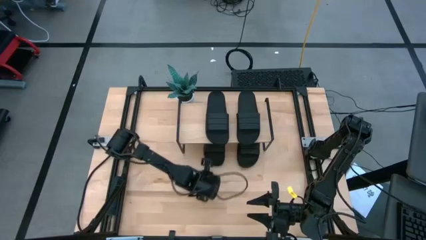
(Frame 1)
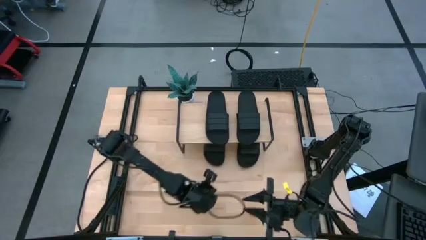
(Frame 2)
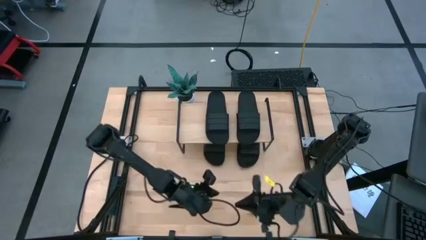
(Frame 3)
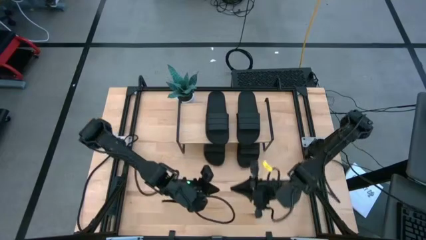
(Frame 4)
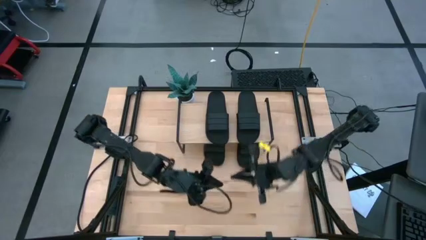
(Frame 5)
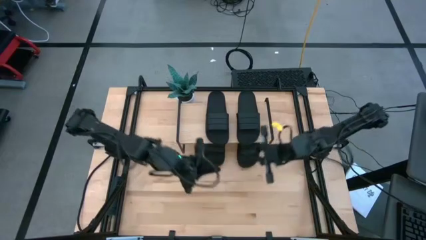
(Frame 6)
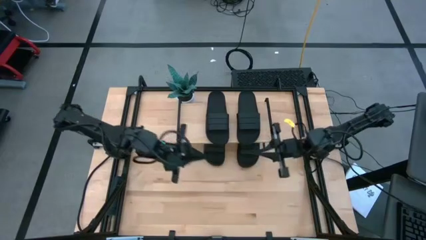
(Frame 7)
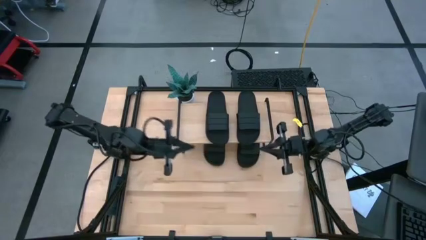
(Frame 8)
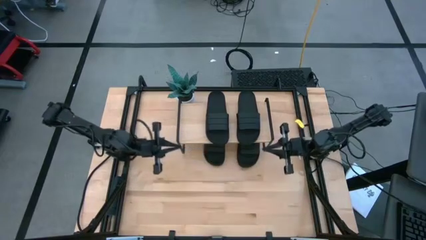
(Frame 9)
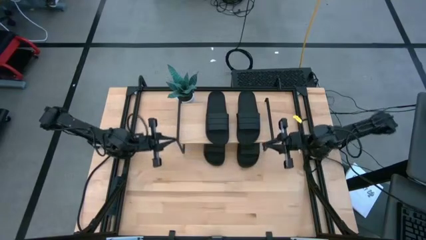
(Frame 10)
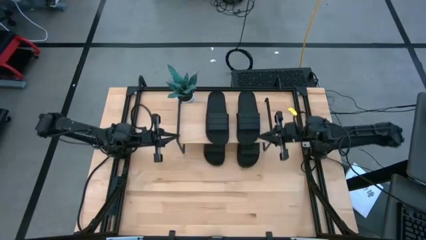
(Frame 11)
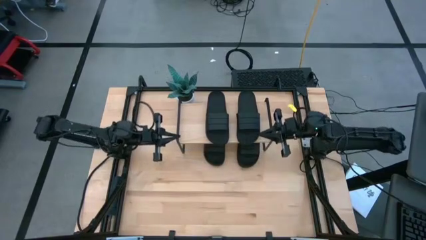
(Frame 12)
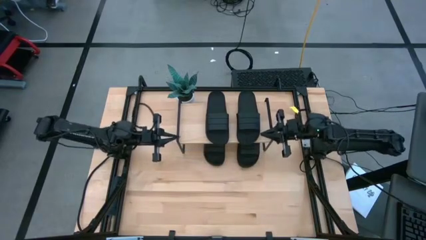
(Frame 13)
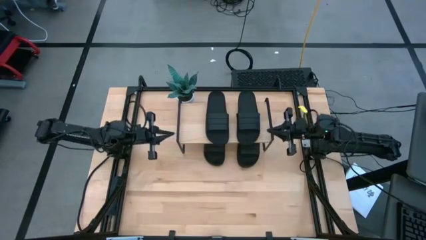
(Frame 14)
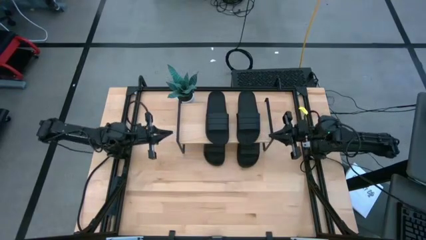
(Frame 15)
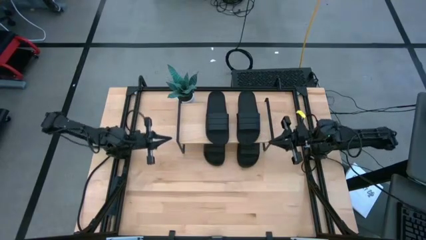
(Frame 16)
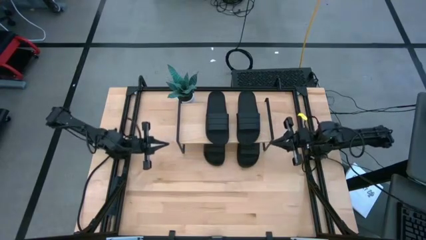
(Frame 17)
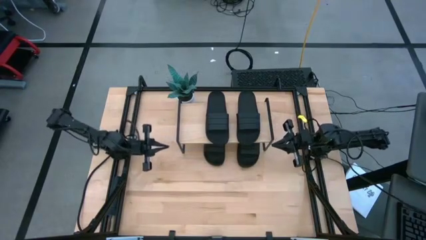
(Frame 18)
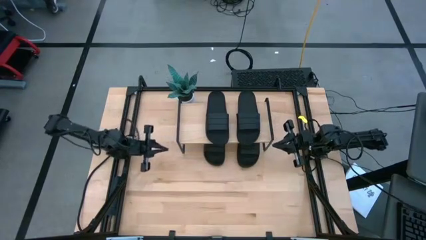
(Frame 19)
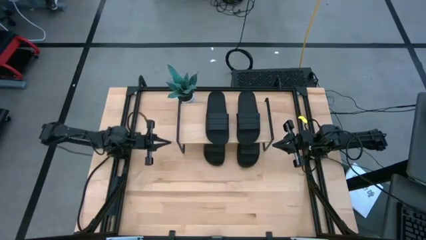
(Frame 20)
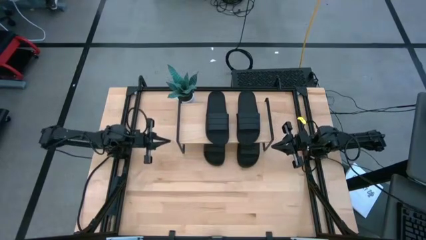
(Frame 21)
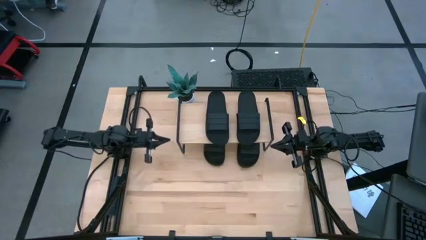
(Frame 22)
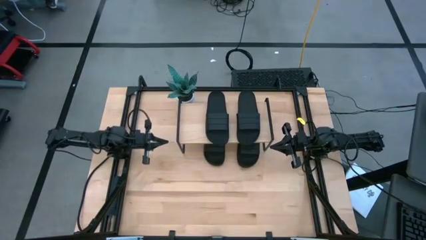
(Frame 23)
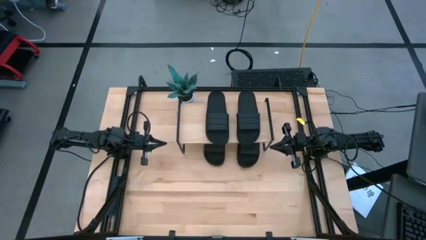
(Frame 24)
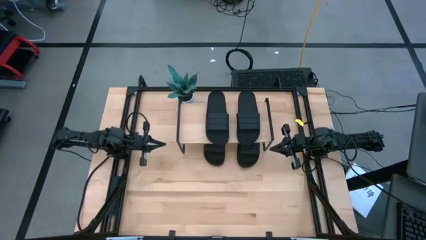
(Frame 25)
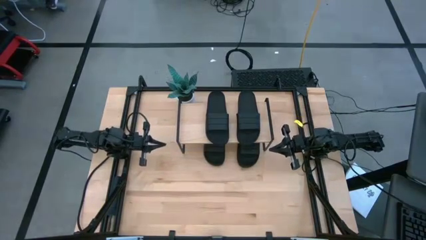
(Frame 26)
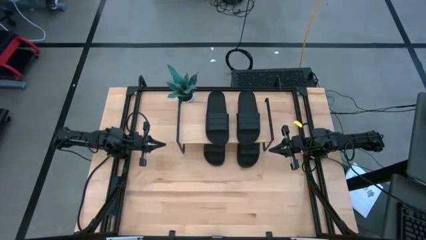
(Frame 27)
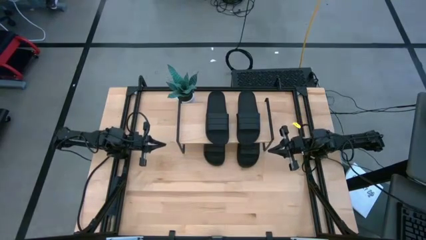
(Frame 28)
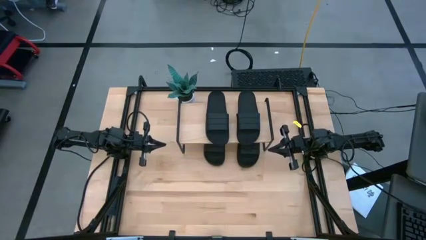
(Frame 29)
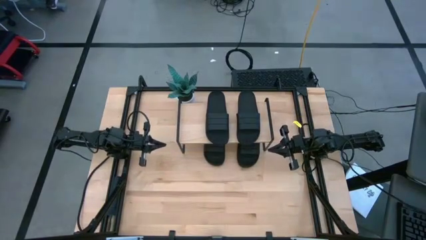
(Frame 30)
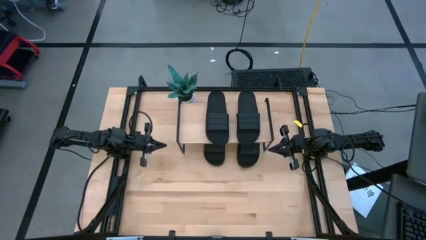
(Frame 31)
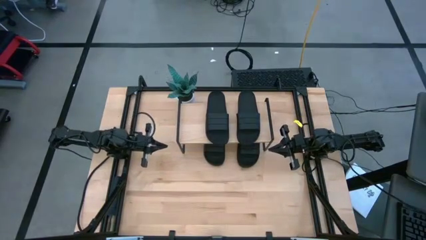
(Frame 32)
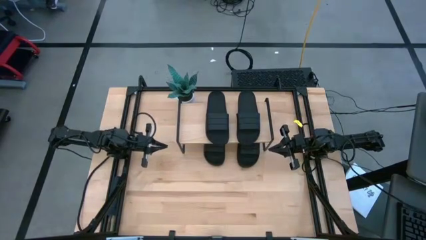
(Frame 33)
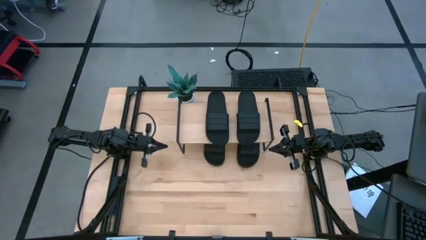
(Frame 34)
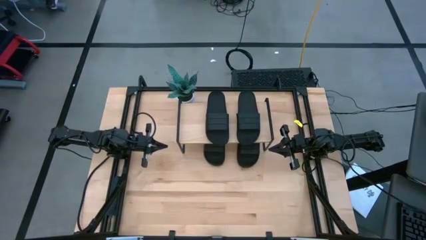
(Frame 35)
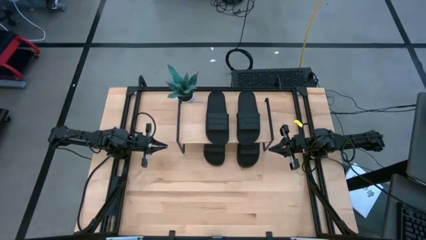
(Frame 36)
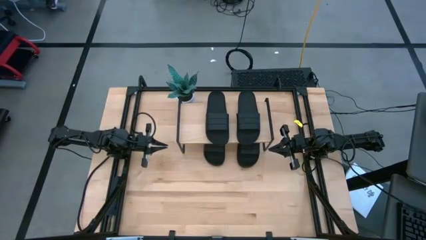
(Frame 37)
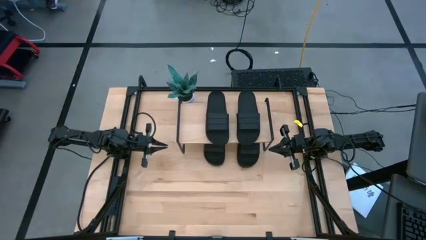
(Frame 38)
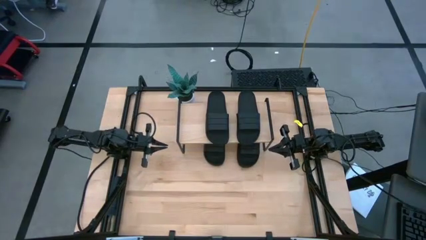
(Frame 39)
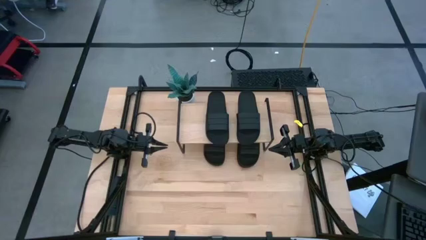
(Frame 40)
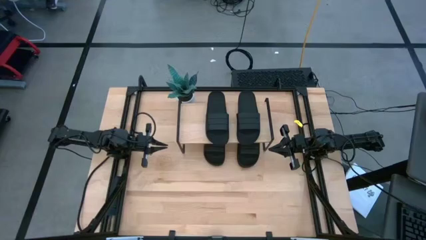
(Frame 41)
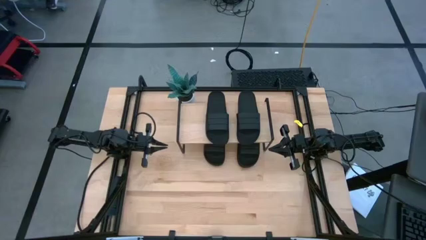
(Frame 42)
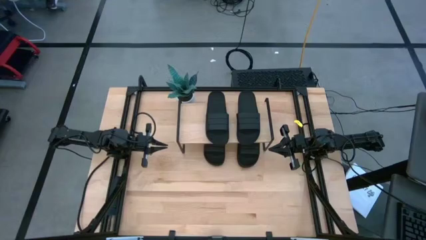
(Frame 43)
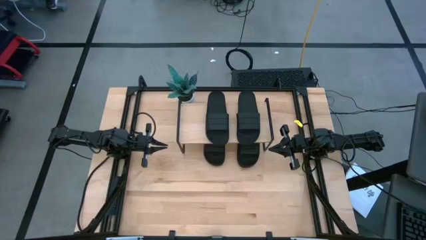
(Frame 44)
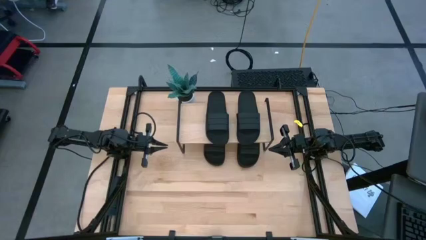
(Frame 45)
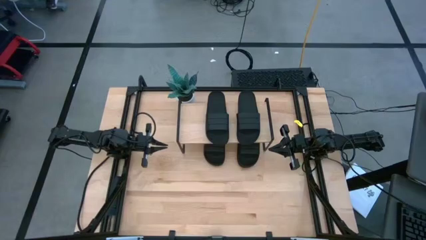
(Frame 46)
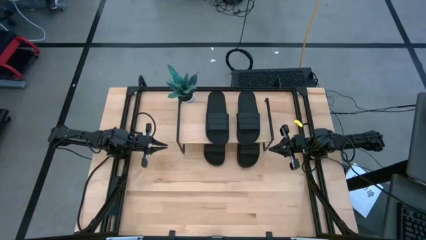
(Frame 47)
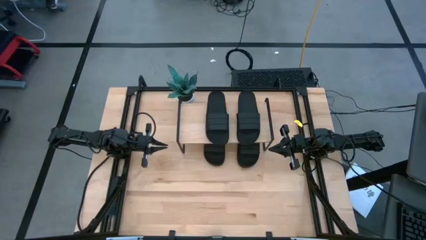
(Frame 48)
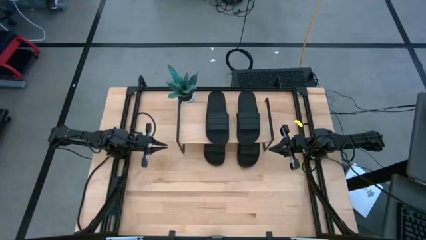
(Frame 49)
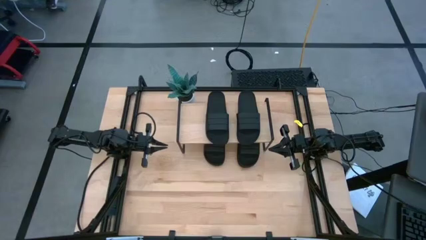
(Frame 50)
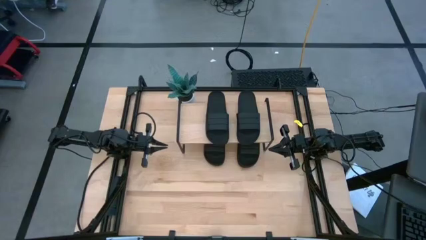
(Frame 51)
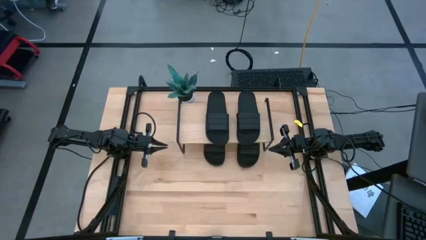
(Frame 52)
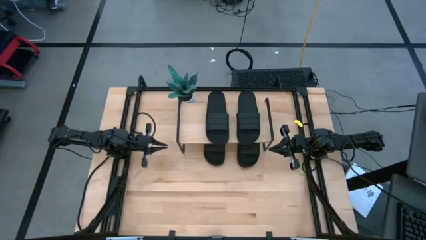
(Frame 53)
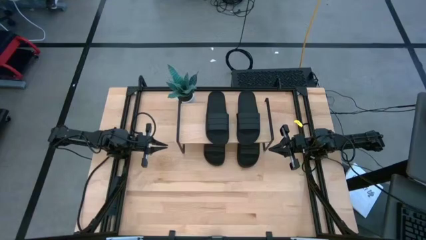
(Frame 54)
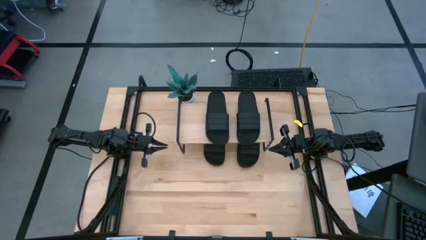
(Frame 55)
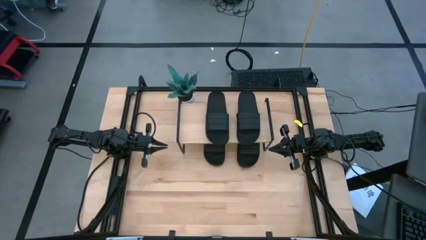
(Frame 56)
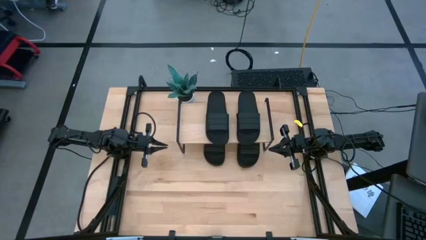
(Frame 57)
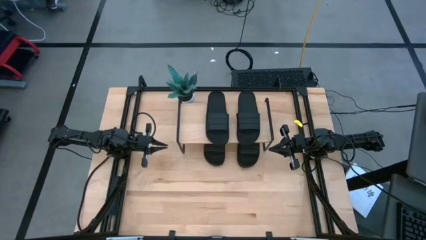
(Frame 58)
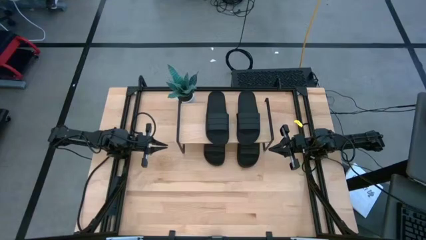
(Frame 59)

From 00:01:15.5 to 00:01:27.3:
Task: Pick and place slides into the shelf
Return to Home Position
